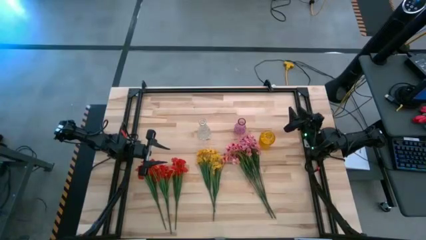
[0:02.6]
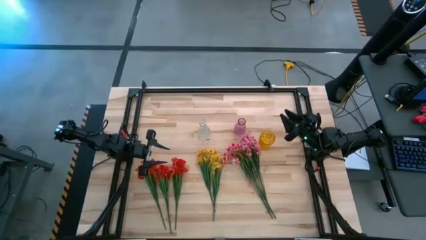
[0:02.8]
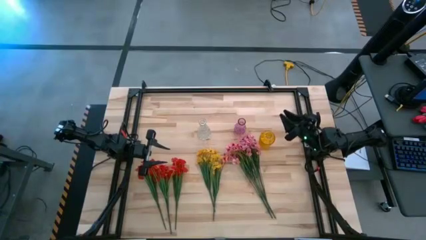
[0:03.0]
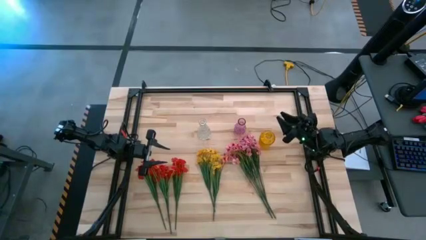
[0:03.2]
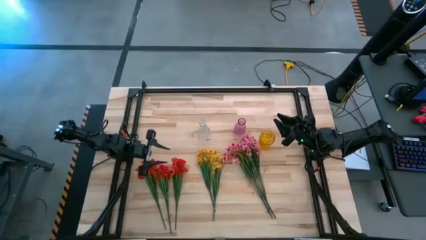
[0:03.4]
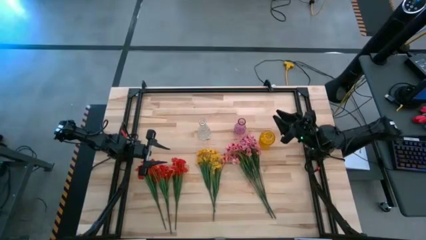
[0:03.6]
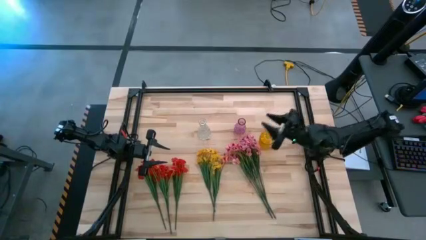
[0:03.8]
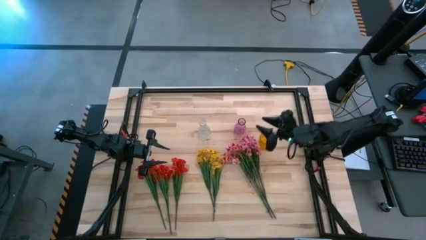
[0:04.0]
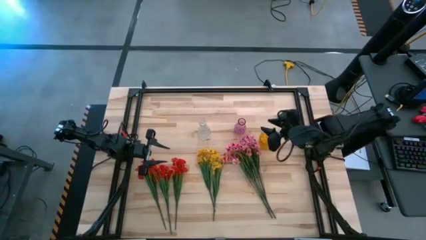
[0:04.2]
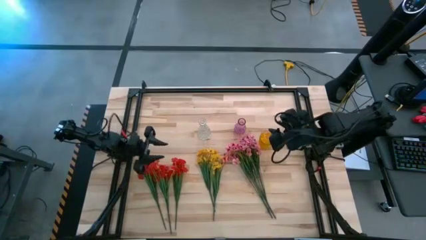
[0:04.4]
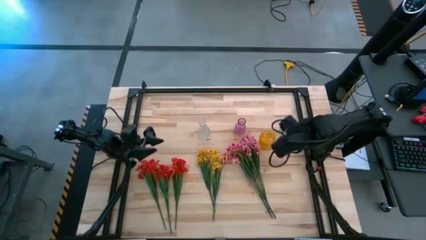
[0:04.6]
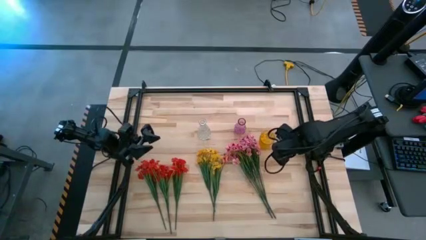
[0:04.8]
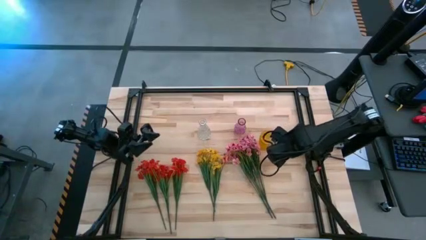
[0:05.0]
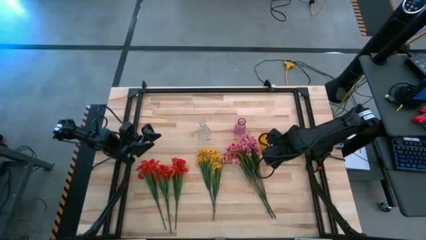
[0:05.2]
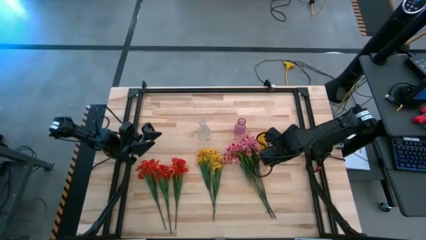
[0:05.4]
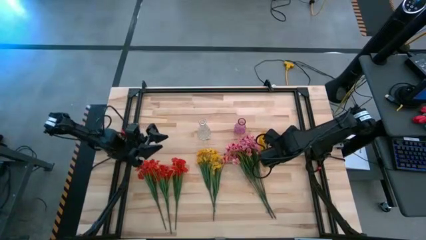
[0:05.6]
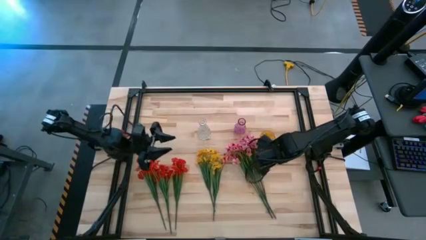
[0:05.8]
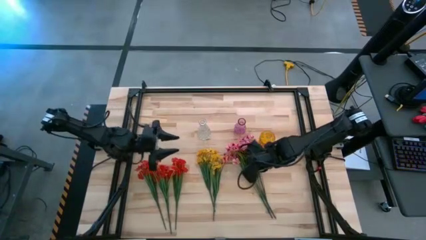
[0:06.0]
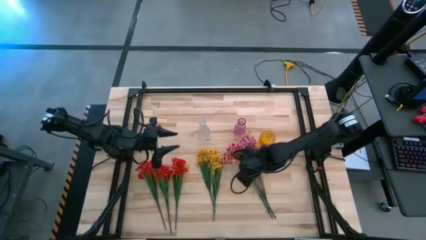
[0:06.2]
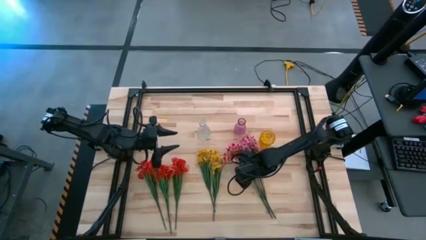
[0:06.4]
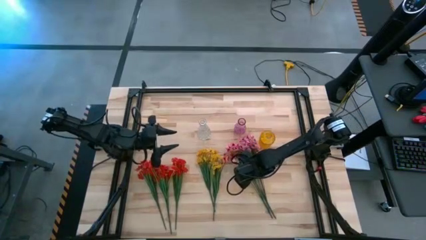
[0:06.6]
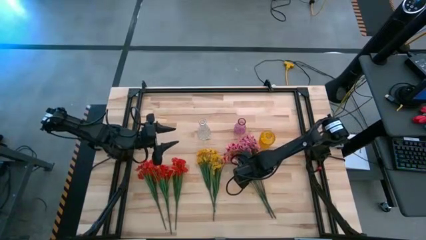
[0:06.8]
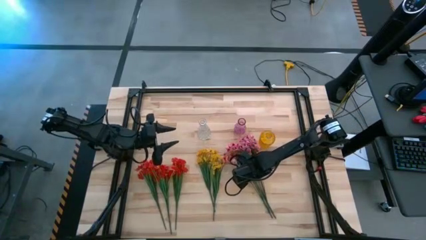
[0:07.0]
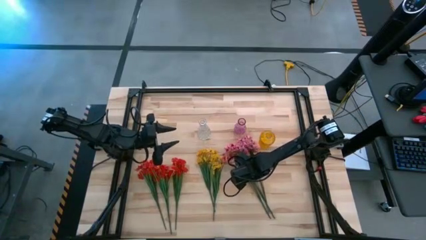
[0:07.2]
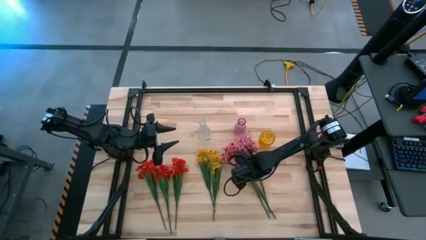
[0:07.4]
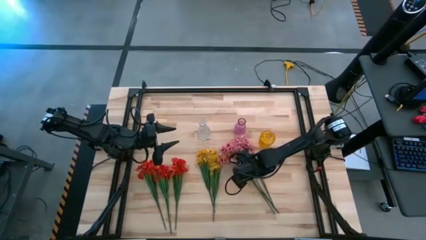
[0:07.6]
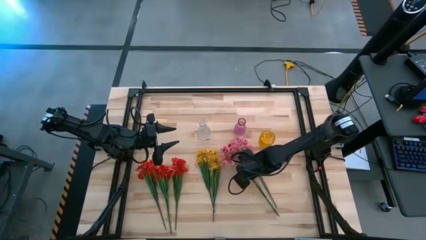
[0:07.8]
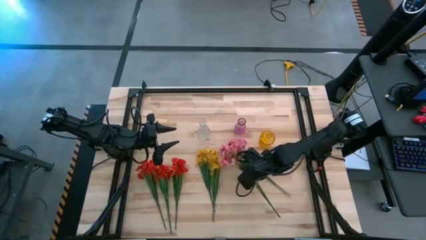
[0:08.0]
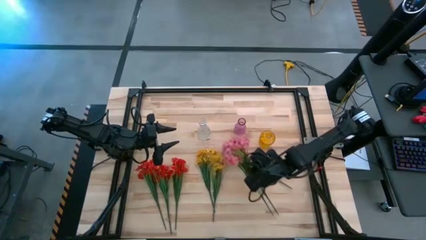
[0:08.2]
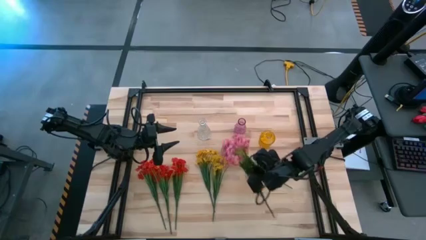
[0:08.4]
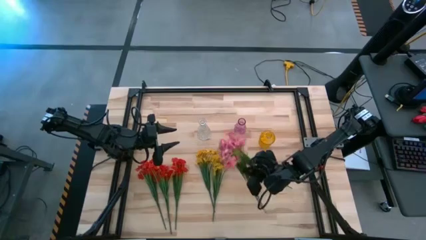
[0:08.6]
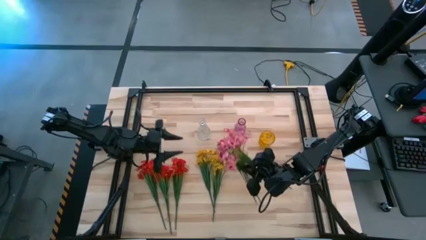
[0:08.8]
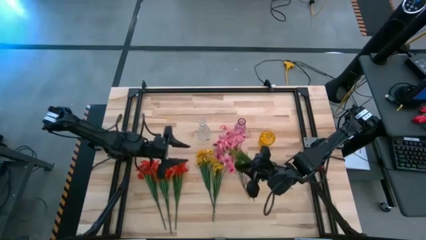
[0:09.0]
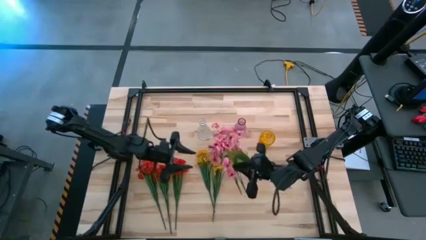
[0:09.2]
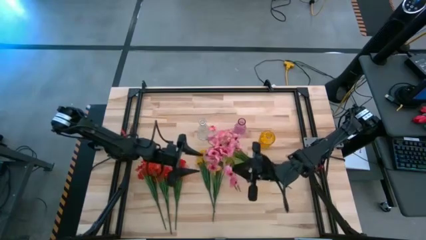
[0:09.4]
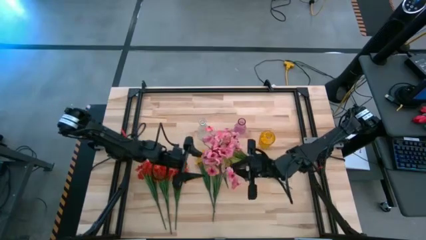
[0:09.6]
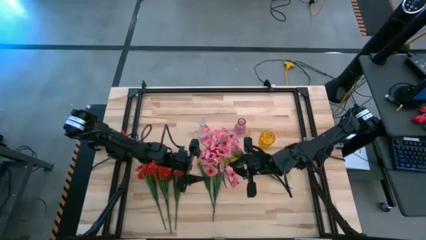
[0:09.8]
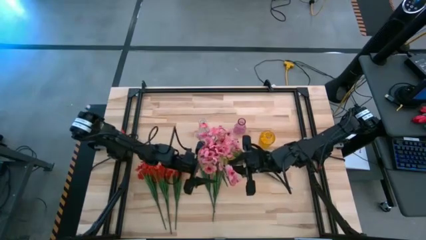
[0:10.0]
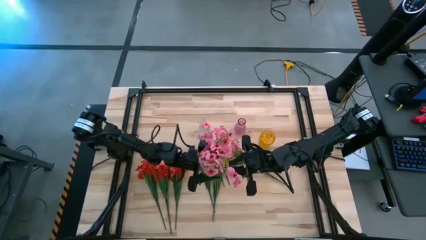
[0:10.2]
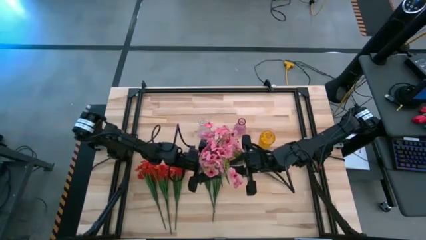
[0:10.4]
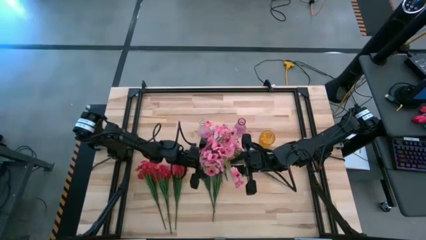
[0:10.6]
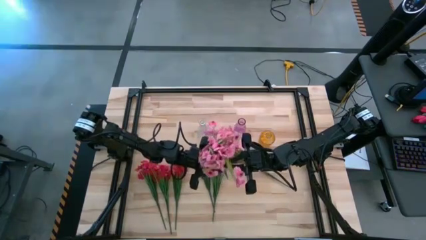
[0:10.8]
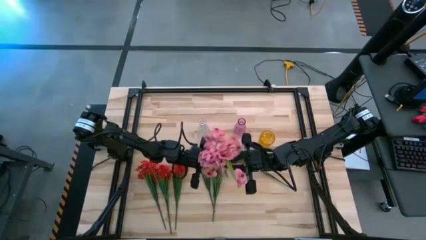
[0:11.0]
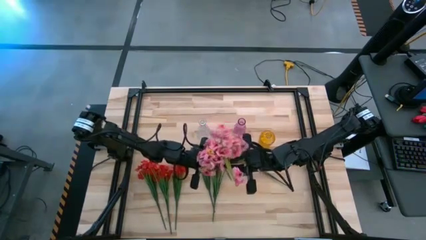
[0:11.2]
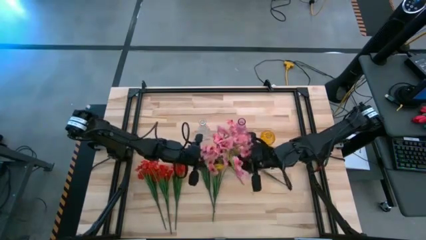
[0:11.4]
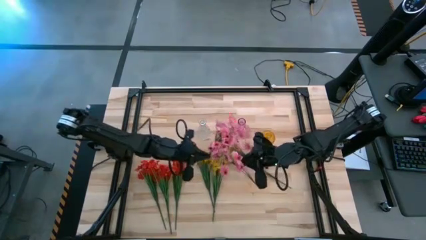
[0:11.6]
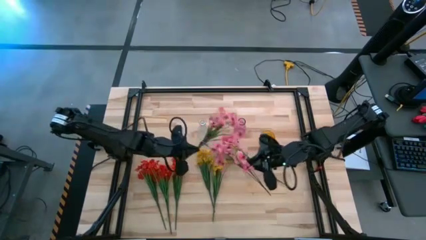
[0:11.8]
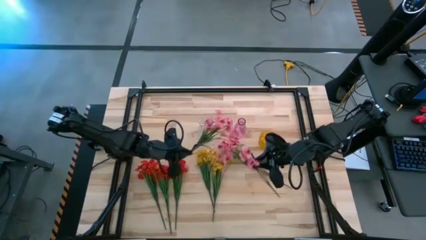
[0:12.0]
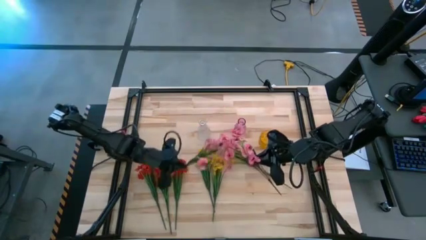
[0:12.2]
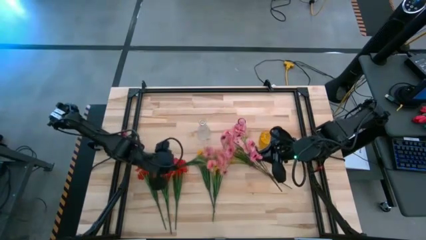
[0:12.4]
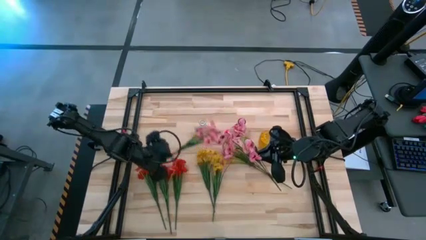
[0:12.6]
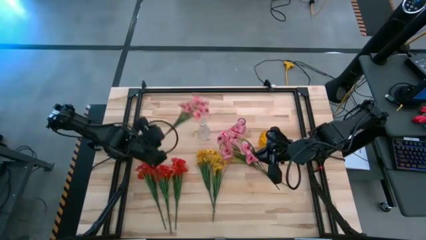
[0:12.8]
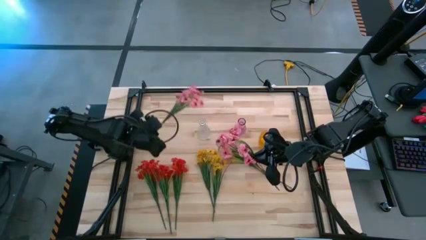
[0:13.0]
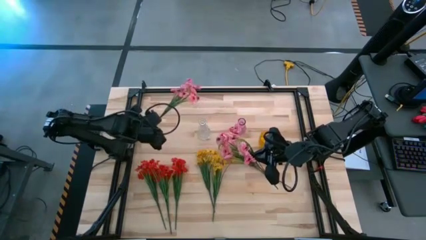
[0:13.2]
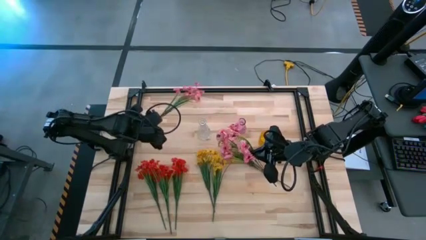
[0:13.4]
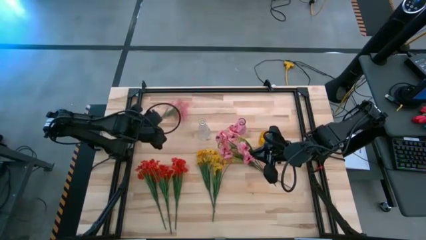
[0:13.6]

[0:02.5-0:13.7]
Task: Sort flowers into vase by color
Put the right pink flowers into the yellow vase

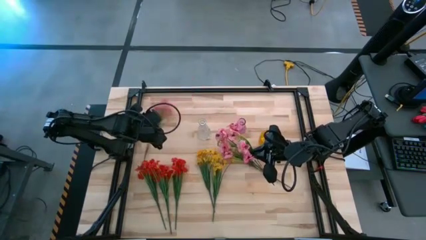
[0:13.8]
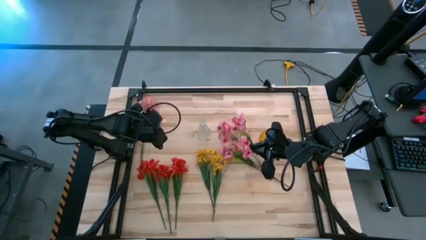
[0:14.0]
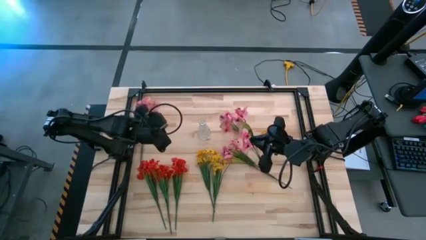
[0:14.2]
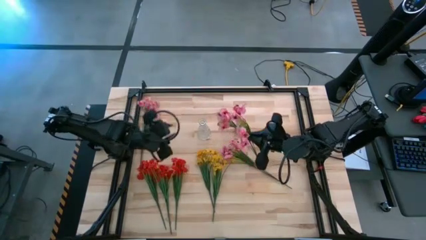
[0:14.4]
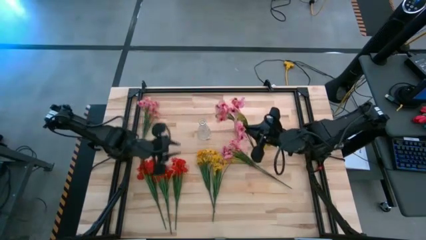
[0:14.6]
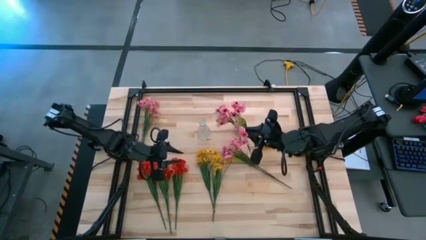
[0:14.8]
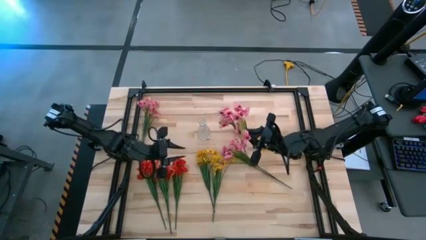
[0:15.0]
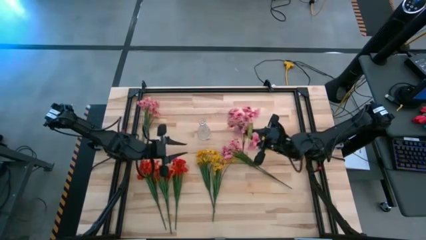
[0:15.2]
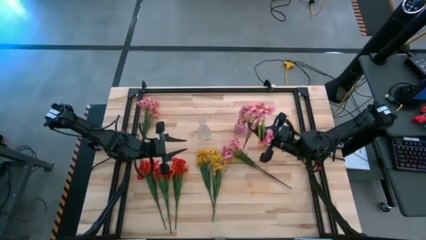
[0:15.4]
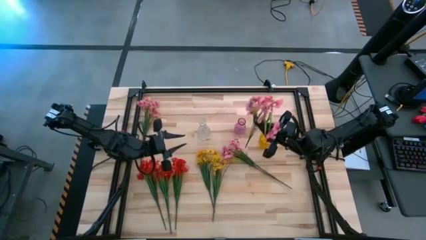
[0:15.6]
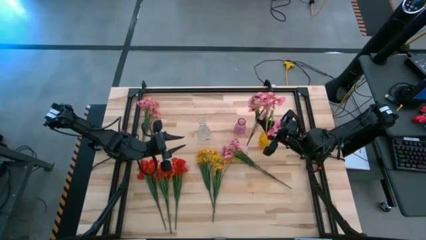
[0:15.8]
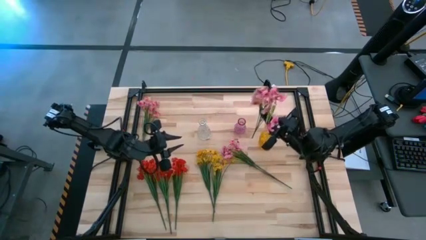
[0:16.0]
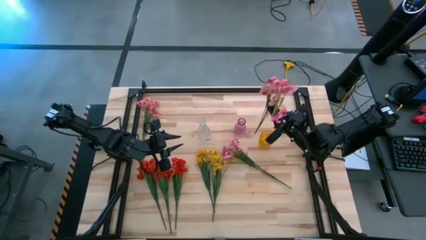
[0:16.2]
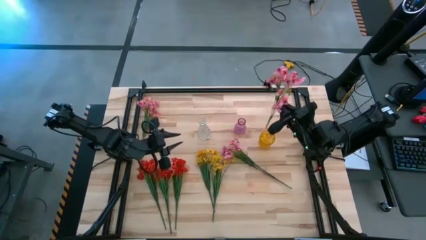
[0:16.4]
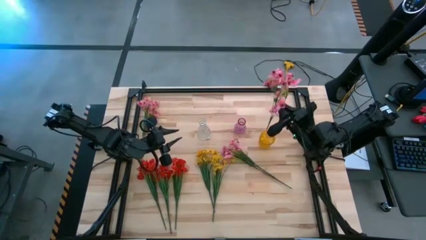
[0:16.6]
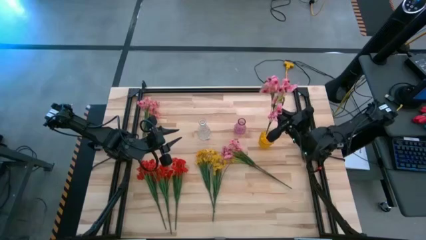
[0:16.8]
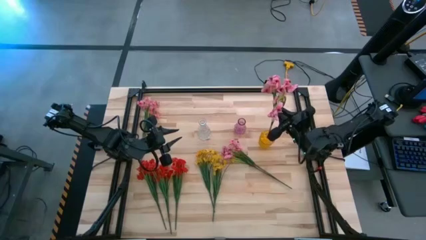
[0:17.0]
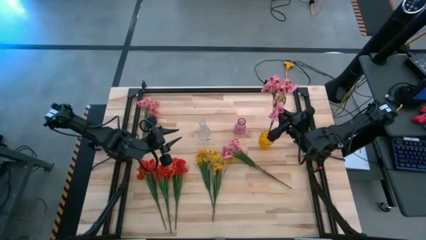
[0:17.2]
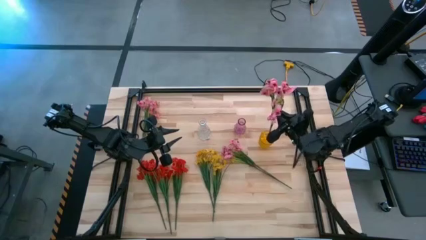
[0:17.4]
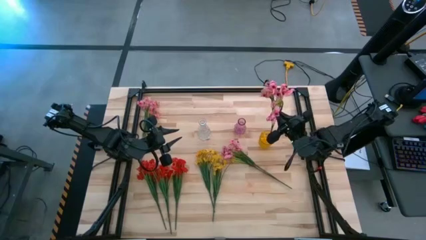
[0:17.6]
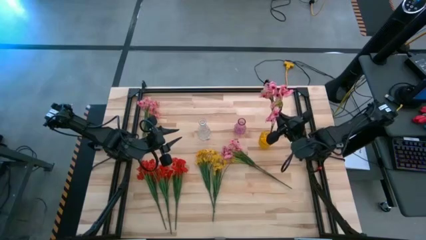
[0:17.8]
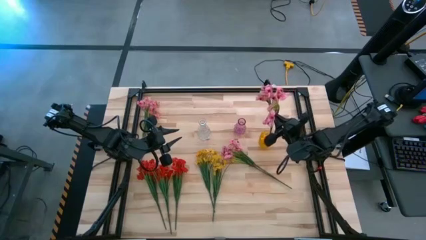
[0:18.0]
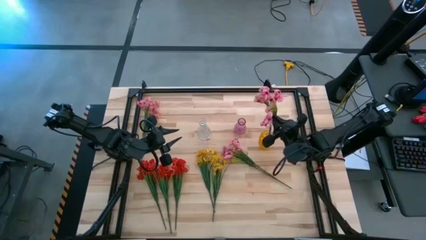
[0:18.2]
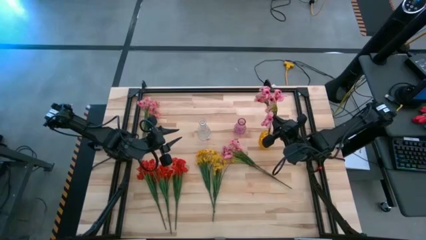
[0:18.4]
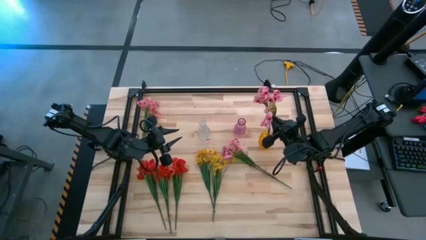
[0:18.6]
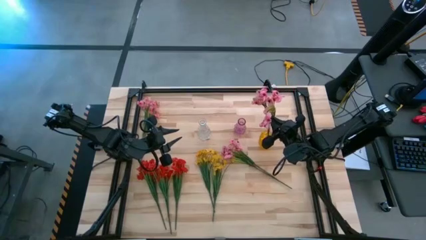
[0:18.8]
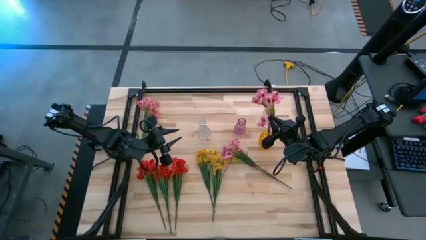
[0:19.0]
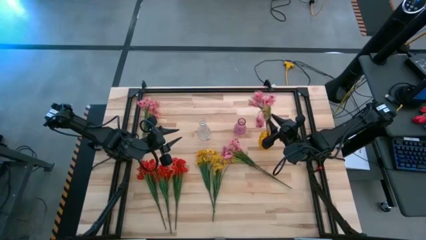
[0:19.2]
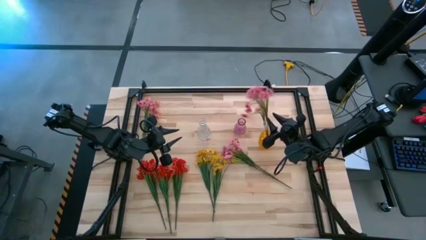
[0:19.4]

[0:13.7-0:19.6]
Put the right pink flowers into the yellow vase
